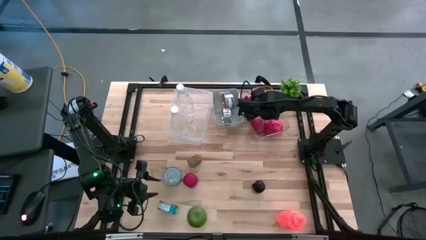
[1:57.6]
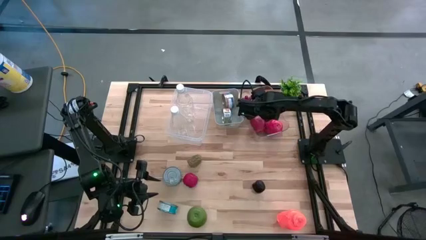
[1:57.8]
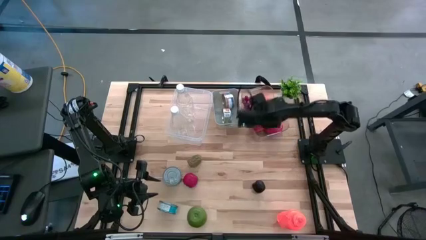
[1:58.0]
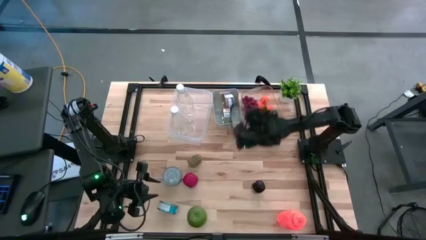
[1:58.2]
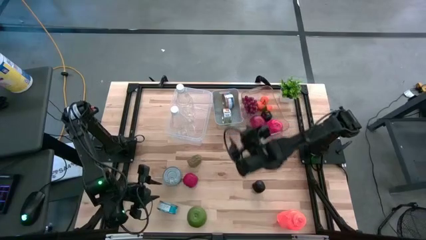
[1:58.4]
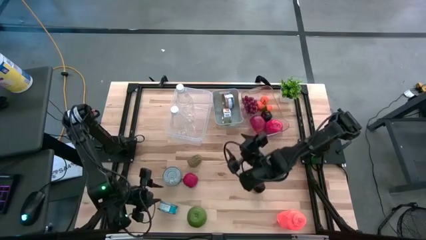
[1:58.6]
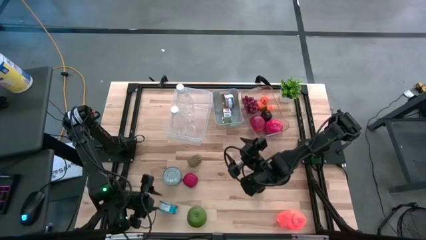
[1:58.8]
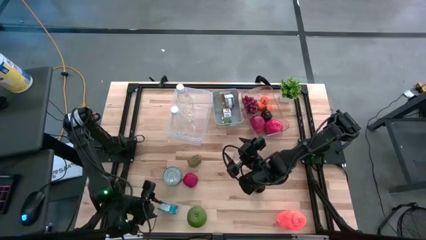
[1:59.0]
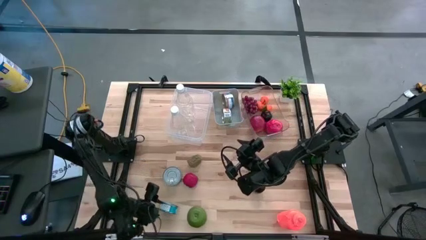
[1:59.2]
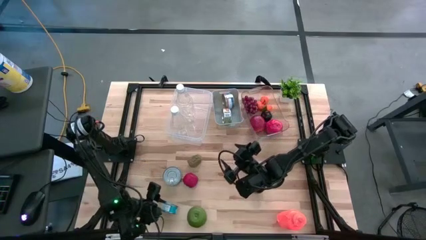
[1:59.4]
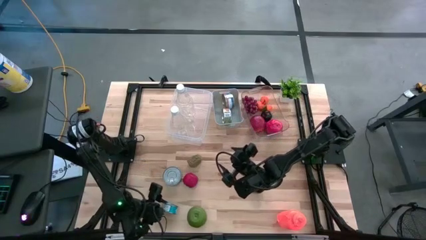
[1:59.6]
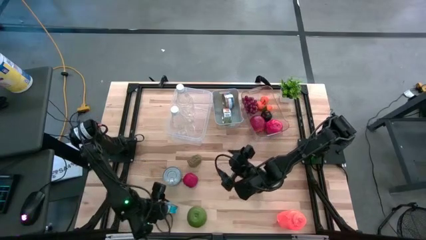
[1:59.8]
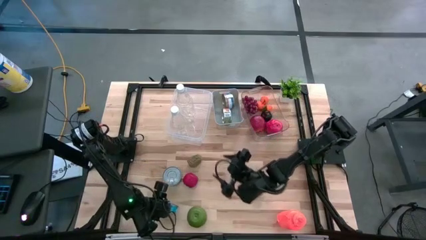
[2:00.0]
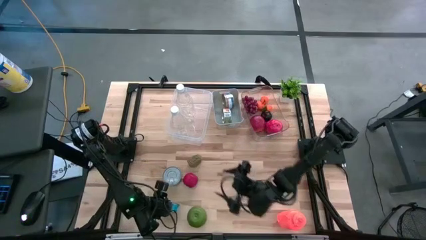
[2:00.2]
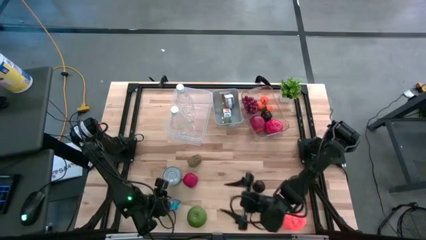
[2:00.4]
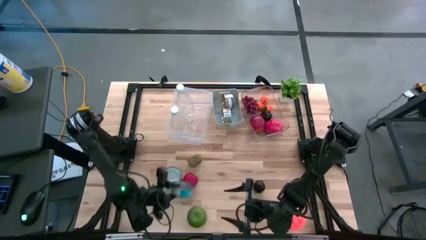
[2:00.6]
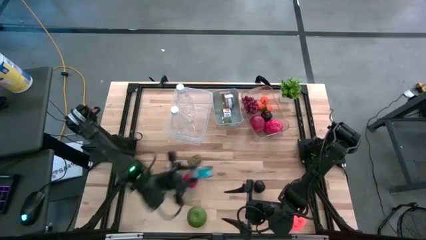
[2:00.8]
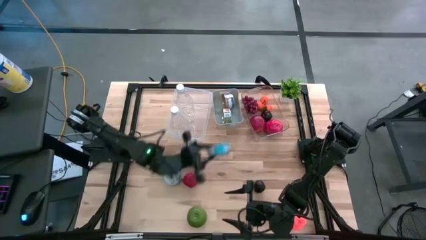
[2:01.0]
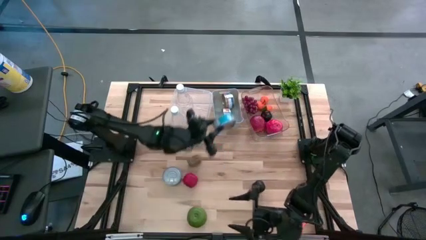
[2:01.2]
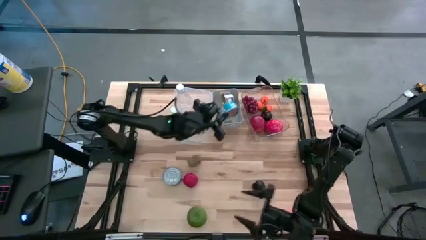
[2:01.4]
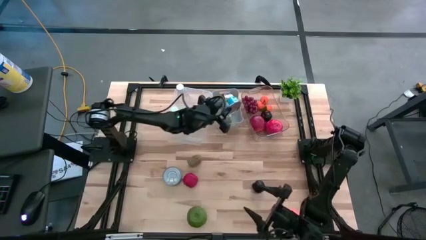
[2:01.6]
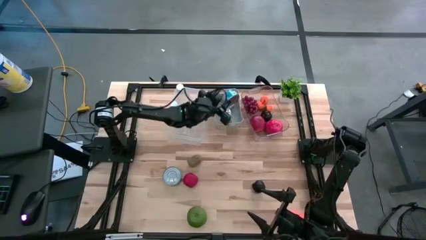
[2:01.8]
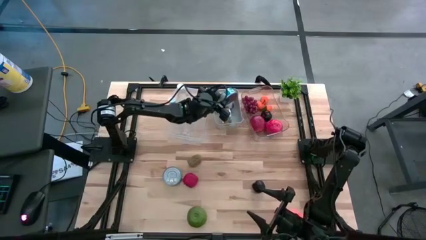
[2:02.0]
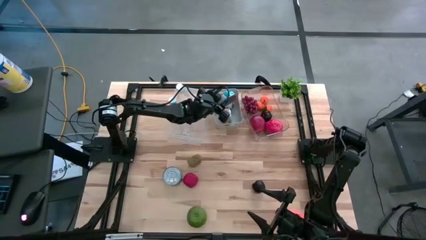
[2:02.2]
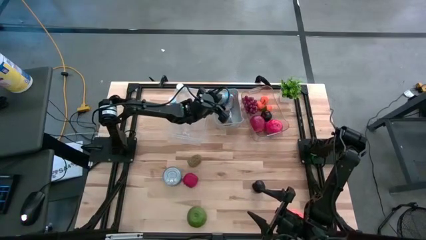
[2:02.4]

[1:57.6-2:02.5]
Task: Pick & Place Food Item
Put the blue canned tuna into the white bin

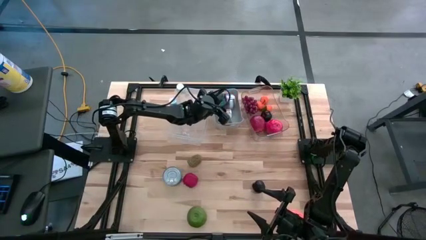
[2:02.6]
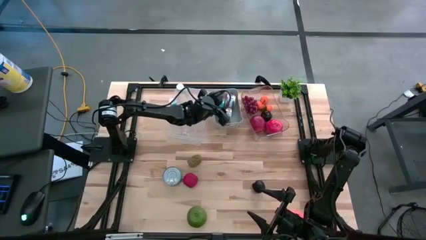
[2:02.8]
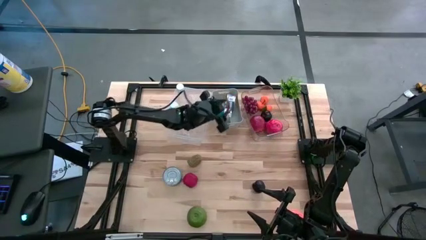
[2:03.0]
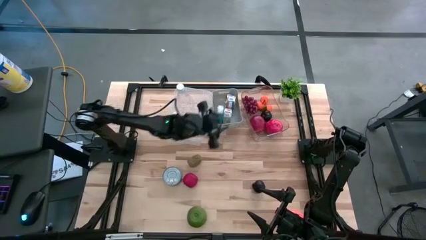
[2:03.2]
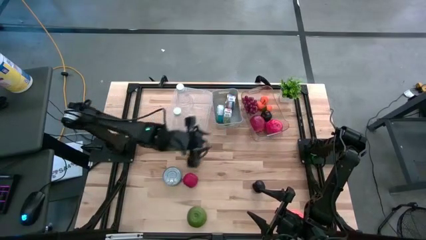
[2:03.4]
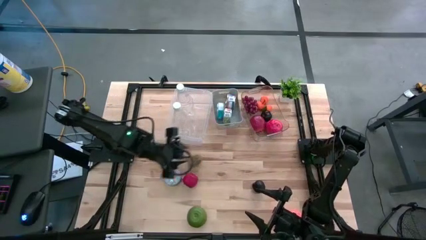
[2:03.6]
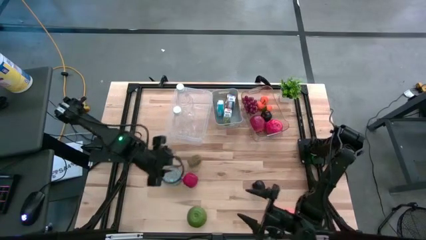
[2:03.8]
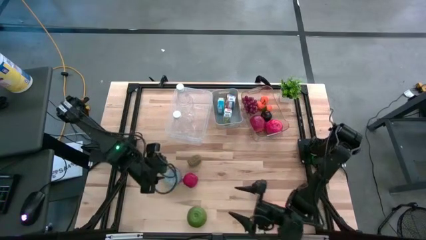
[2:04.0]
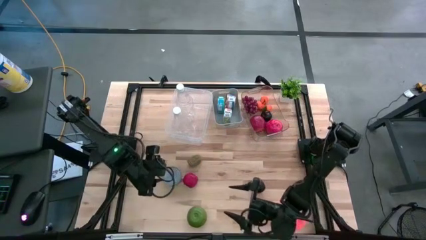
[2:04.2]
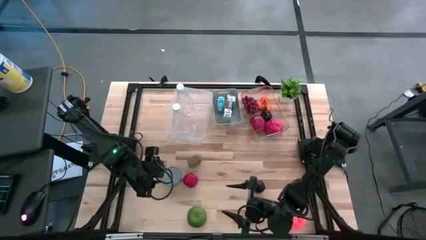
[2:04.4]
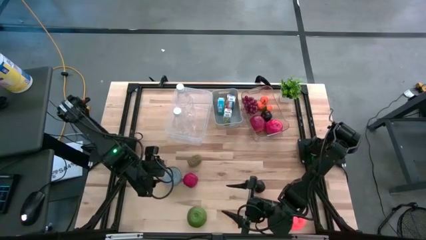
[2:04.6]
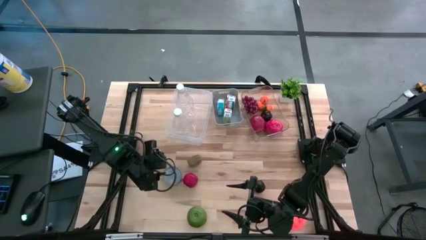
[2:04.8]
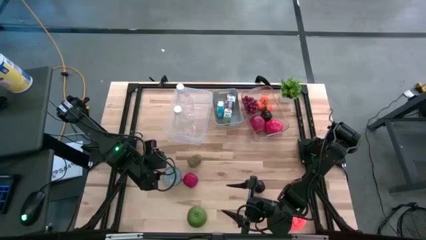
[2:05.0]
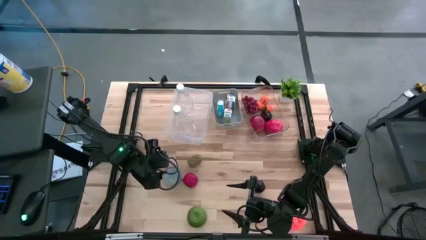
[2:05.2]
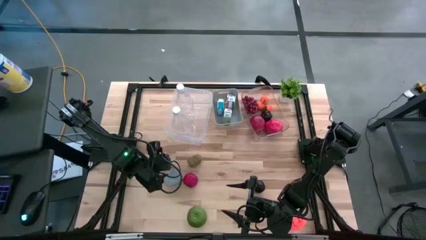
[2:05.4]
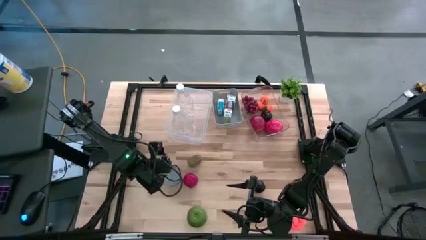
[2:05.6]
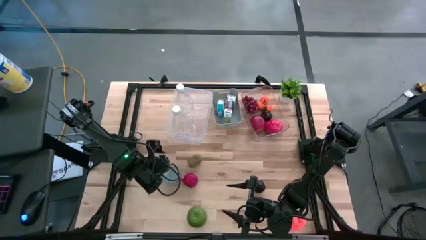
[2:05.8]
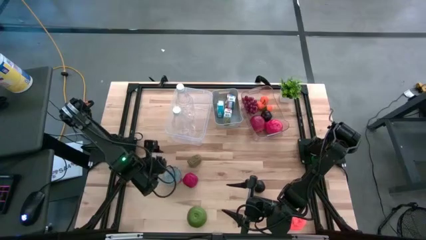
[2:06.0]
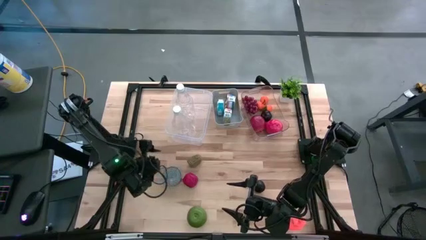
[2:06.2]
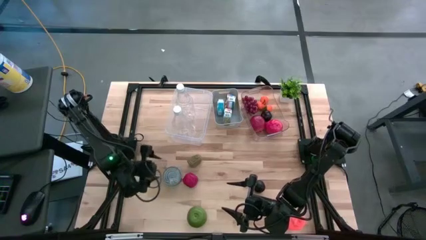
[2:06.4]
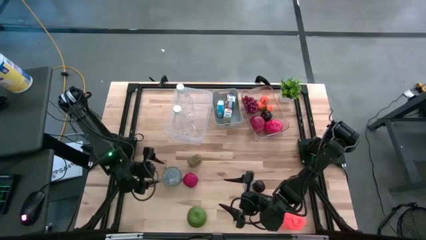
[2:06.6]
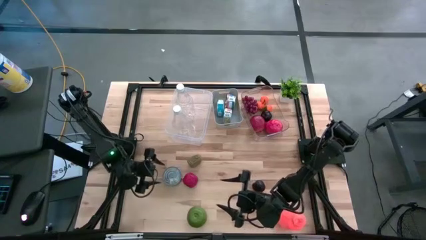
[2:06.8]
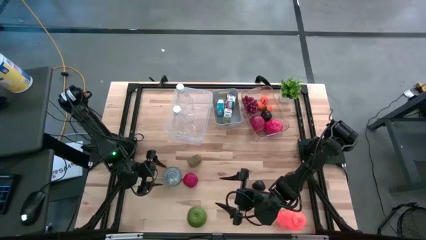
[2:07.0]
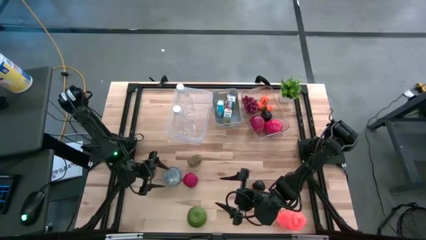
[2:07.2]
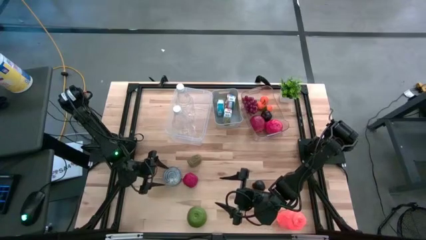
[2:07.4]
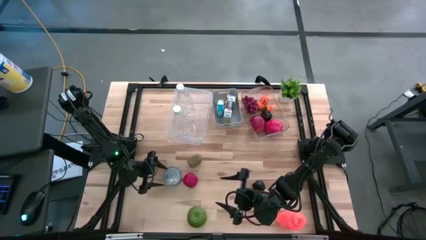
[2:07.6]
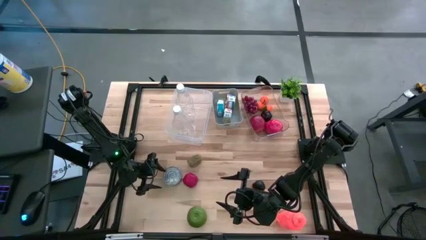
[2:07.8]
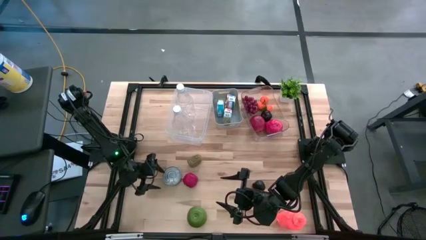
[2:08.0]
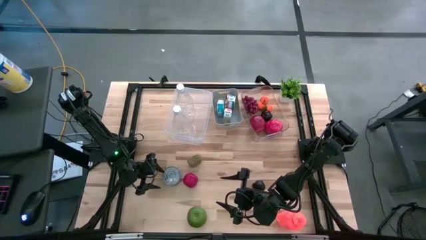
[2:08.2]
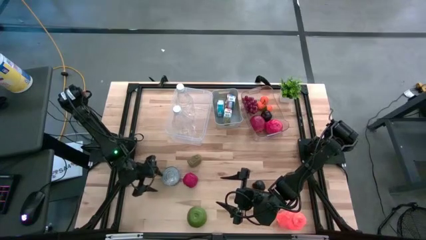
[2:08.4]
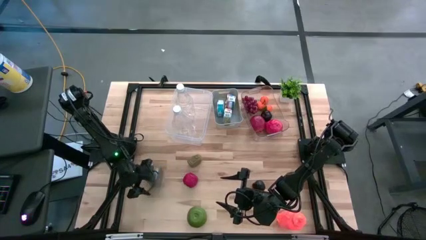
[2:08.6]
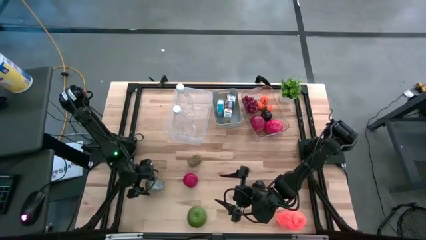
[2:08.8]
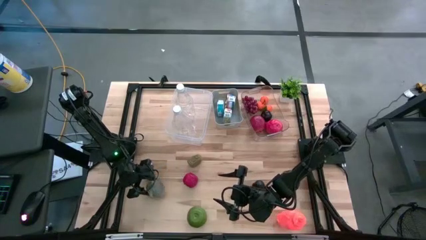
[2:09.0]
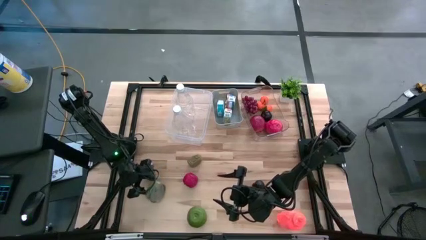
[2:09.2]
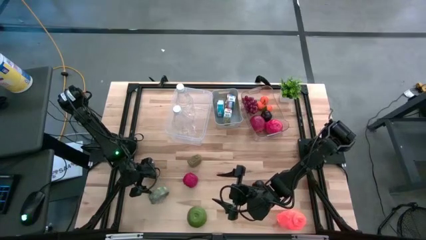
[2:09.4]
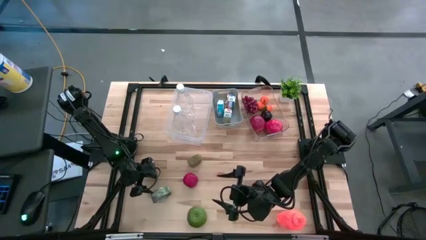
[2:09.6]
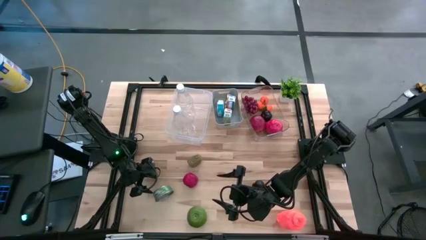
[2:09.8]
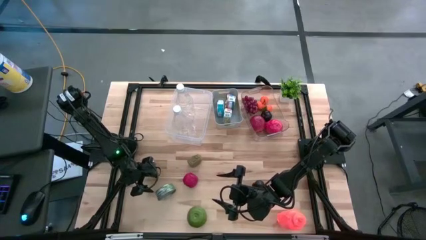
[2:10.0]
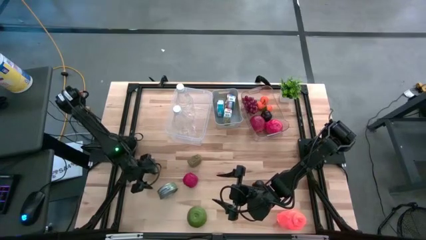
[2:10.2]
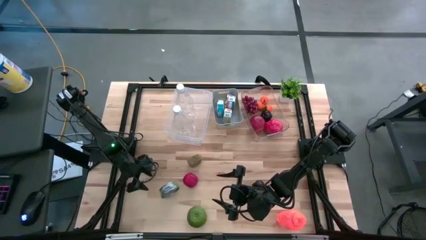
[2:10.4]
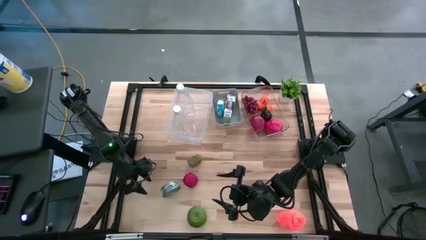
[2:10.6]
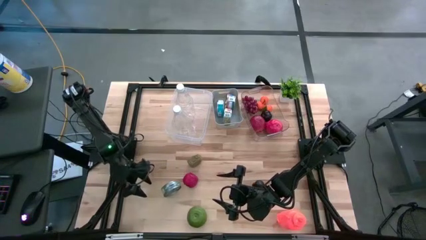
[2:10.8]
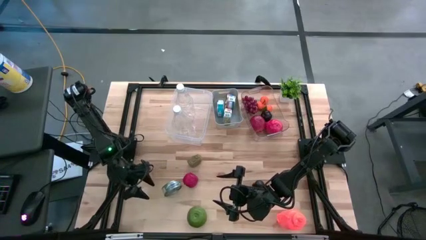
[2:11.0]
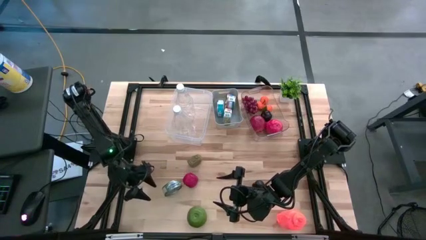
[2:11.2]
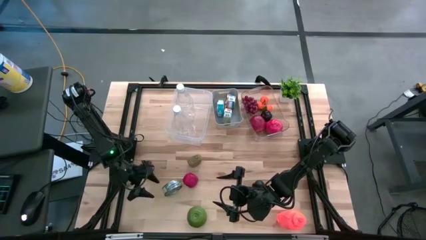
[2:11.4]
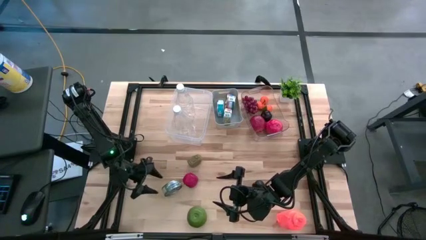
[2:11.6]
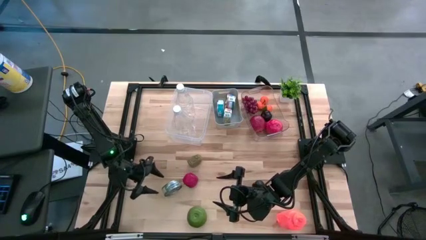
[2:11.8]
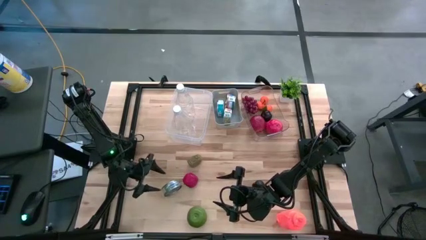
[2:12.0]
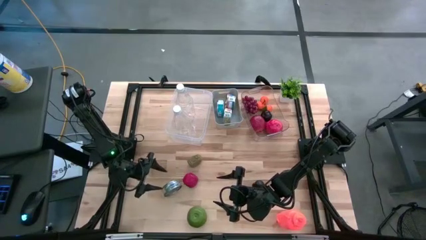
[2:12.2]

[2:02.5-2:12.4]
Put the green canned tuna into the white bin

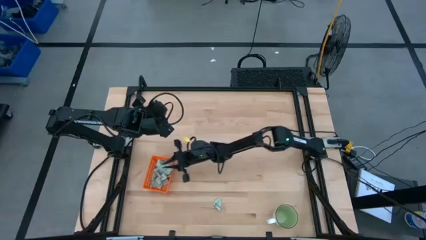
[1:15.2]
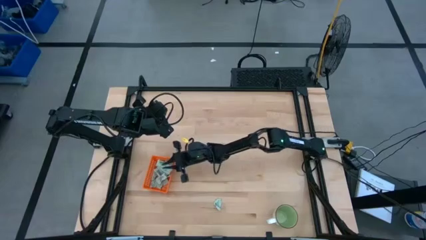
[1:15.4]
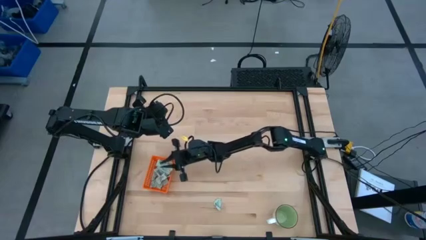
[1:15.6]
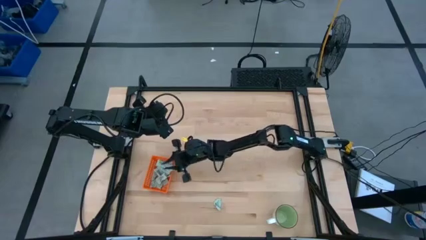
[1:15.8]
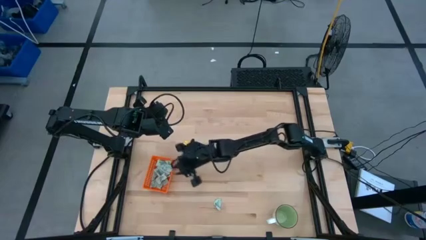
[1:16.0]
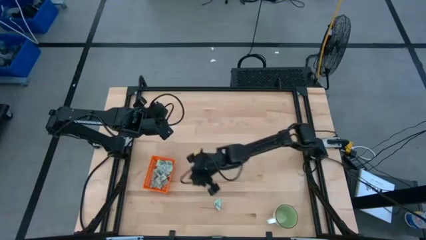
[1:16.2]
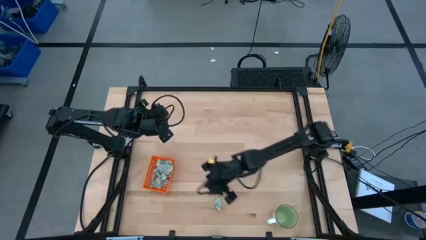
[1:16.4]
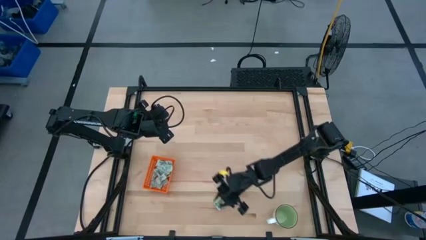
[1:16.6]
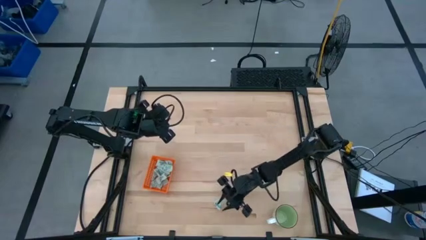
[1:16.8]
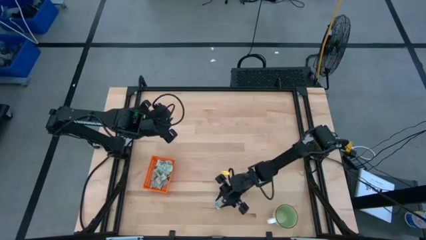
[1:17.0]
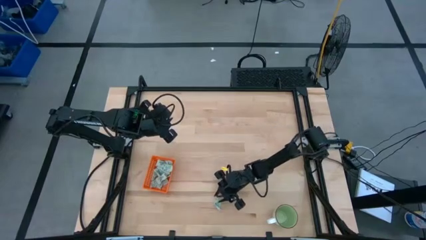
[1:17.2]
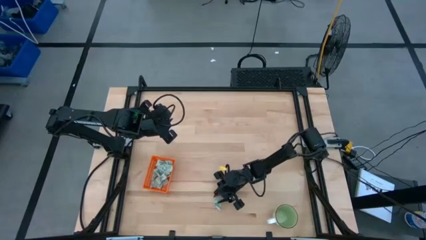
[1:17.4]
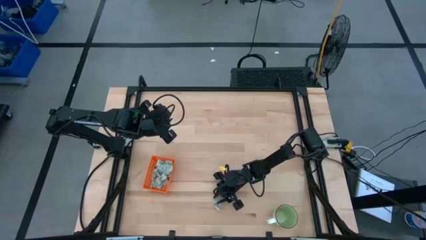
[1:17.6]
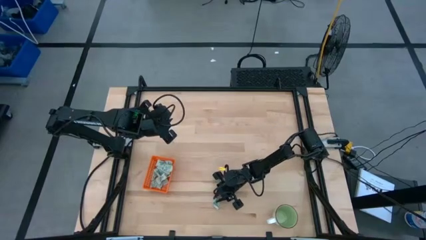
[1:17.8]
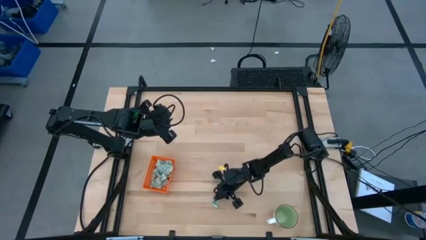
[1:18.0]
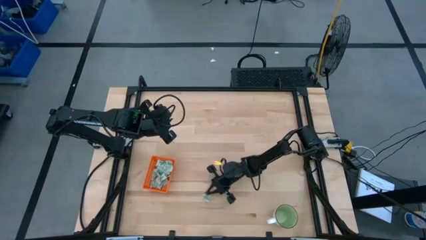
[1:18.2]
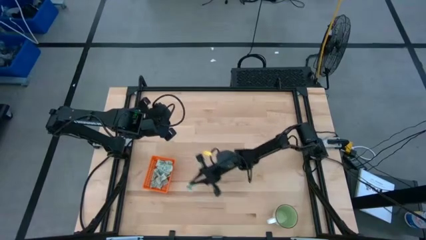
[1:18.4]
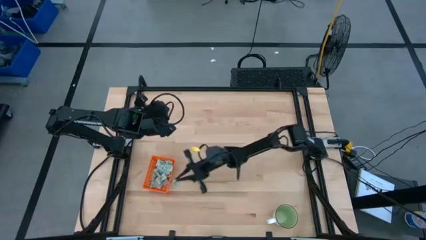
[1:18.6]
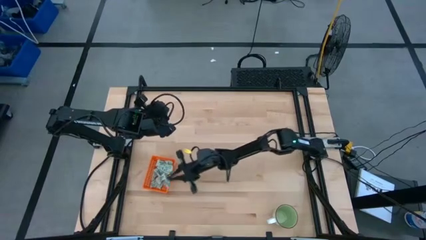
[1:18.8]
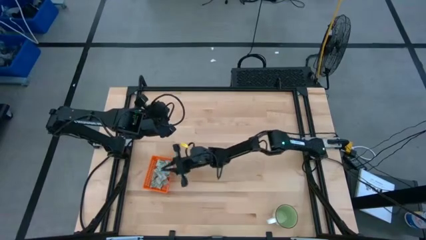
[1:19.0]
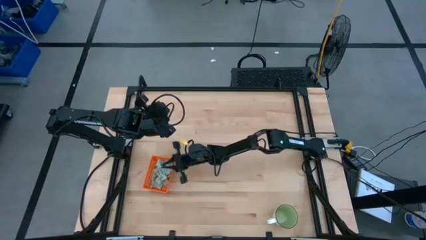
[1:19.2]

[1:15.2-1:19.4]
Task: Pick and place Stevia / Truvia into bins
Put the white stevia packet into the orange bin
